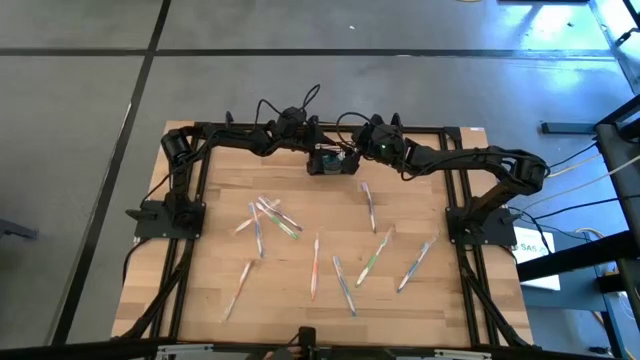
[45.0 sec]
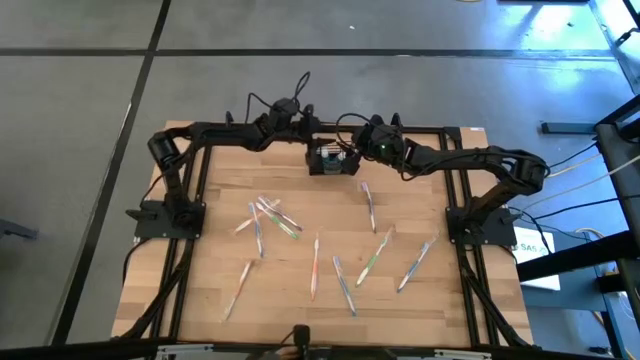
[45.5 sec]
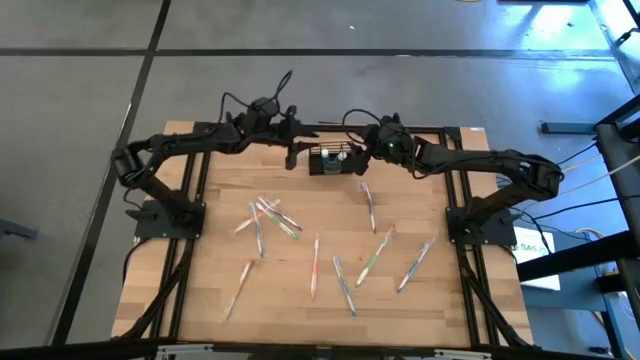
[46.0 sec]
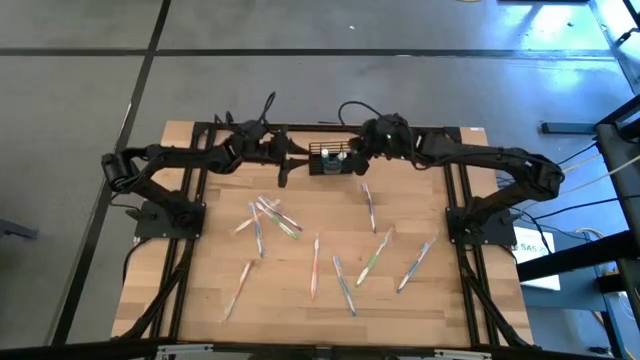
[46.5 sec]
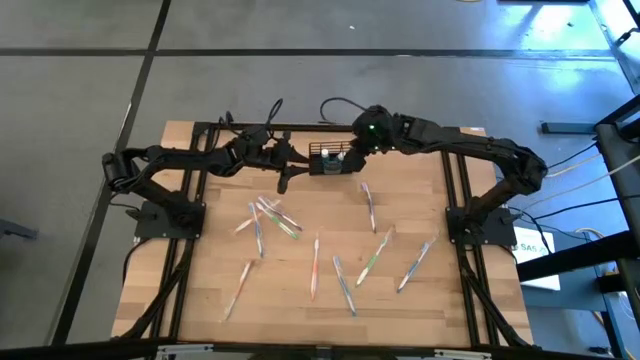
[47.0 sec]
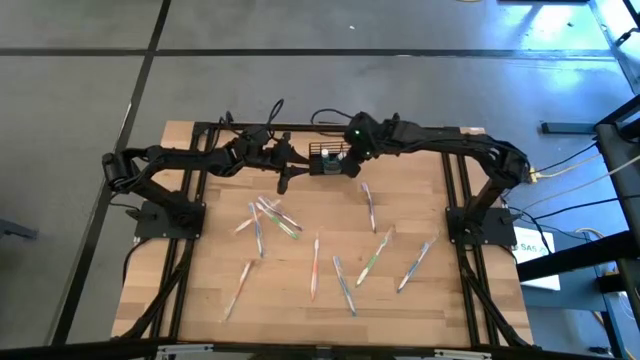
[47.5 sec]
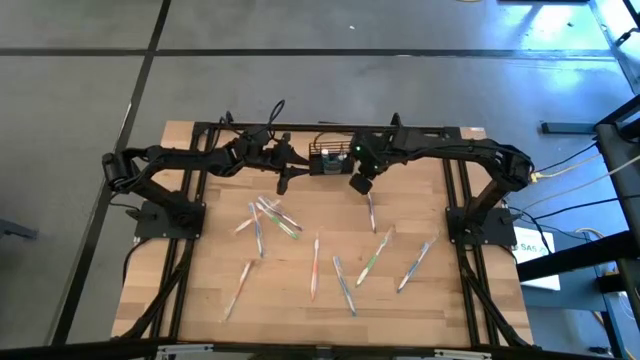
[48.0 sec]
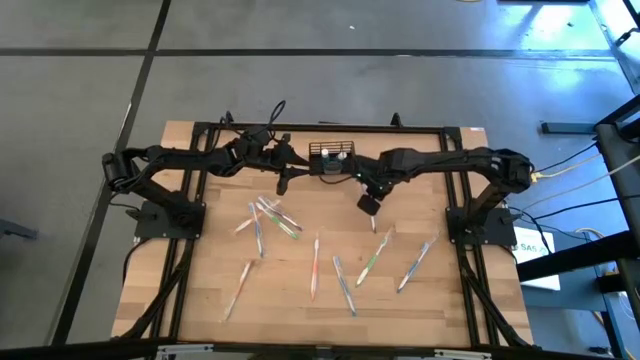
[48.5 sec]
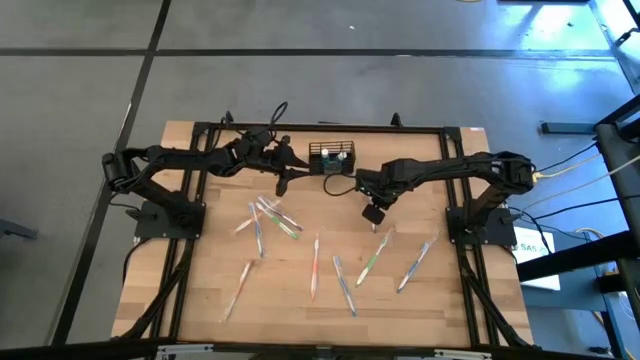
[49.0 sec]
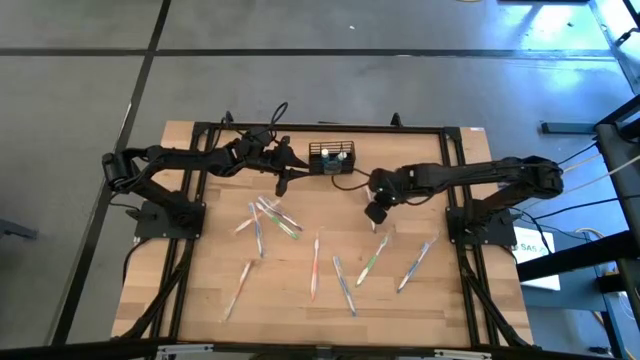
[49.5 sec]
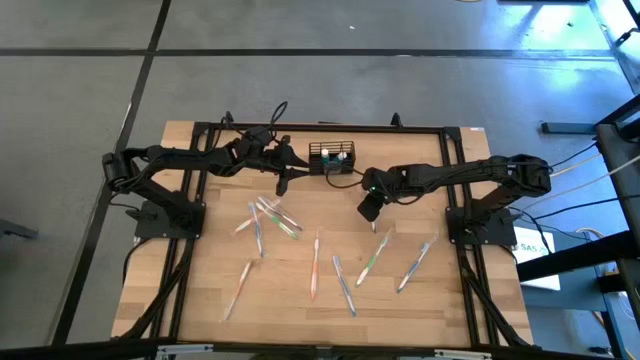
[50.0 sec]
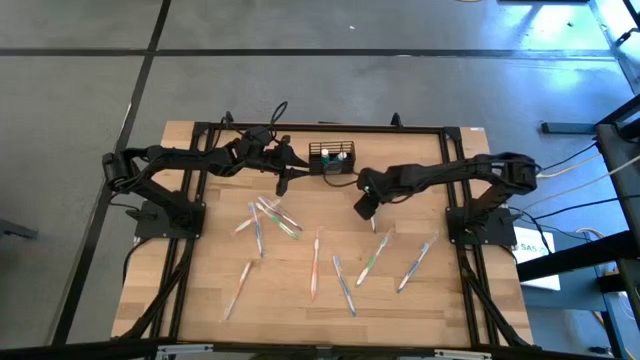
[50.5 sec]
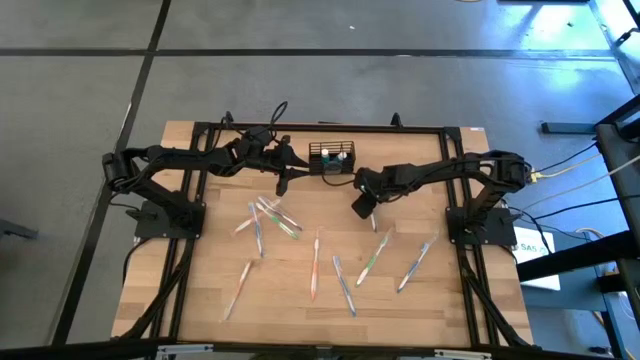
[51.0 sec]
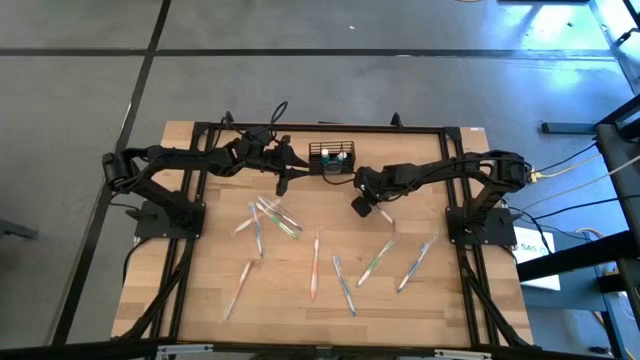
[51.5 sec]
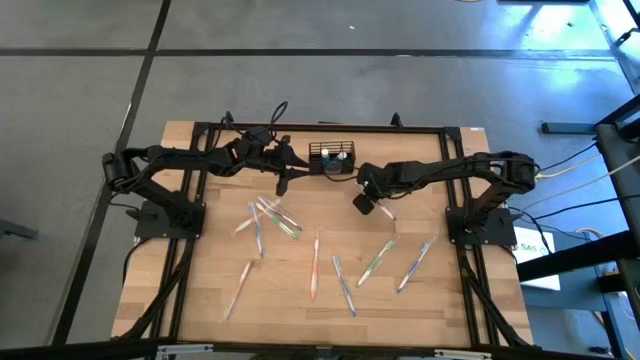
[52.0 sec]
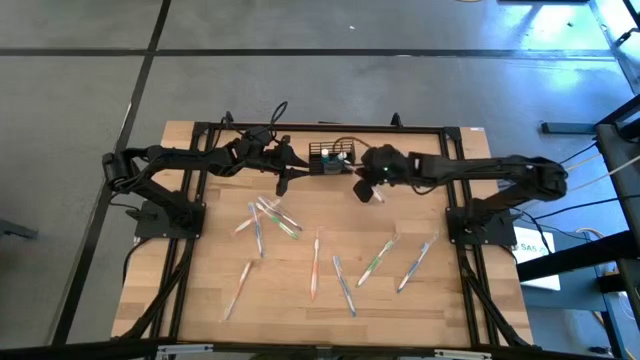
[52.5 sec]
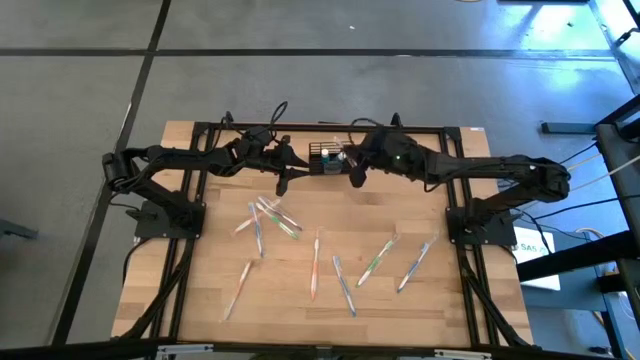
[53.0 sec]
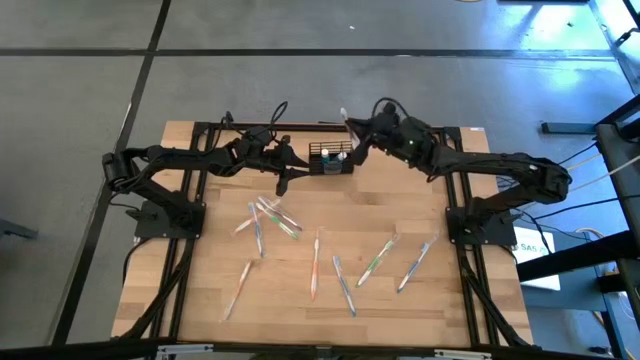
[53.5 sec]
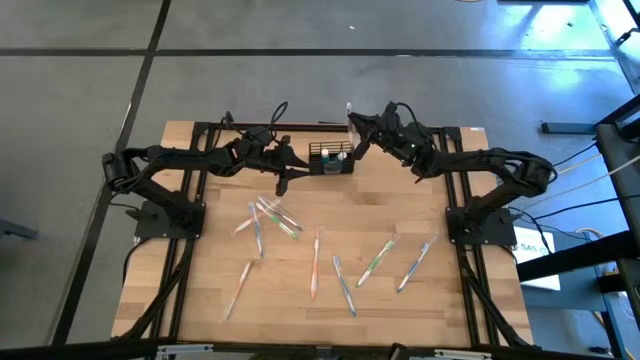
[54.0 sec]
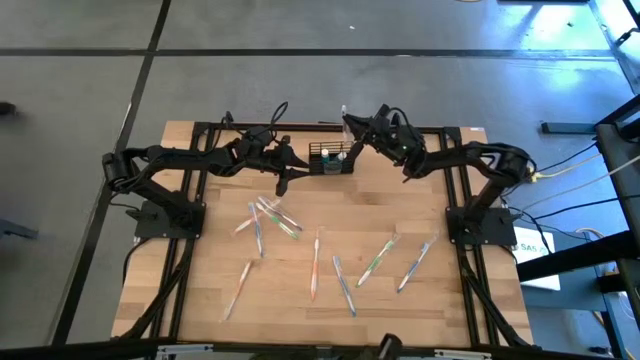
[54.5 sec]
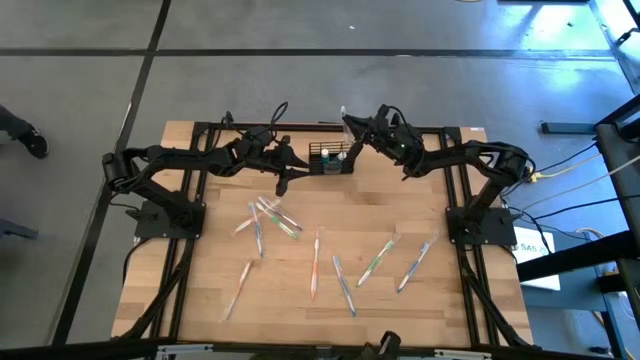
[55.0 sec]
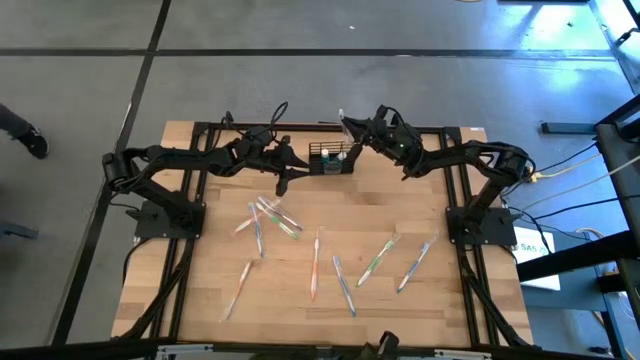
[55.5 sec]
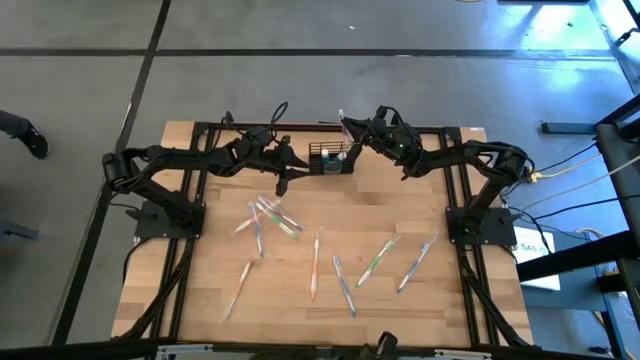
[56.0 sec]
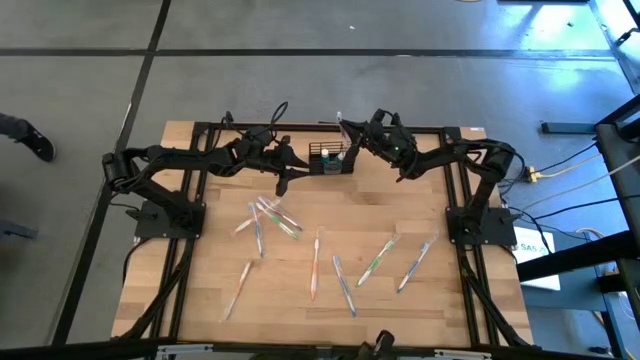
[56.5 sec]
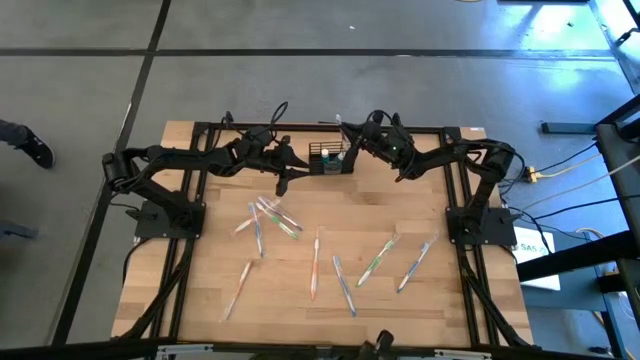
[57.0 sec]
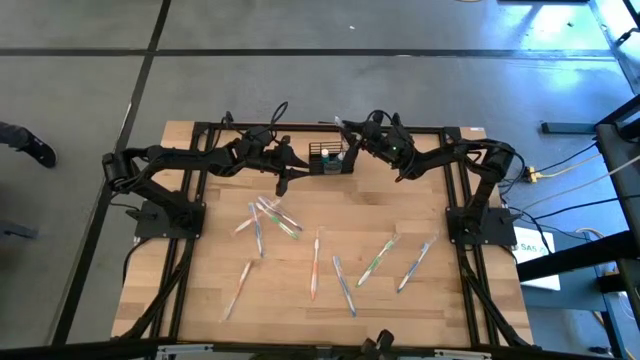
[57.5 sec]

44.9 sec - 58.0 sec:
Task: Pick & Place toothbrushing station
Put the right purple toothbrush in the right section of the wire organizer

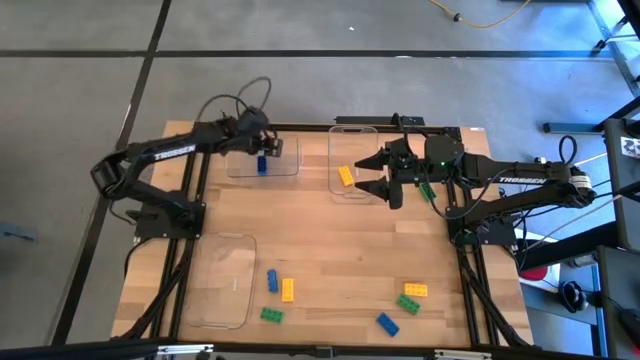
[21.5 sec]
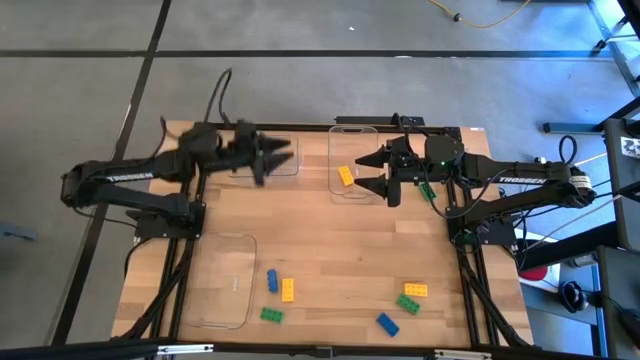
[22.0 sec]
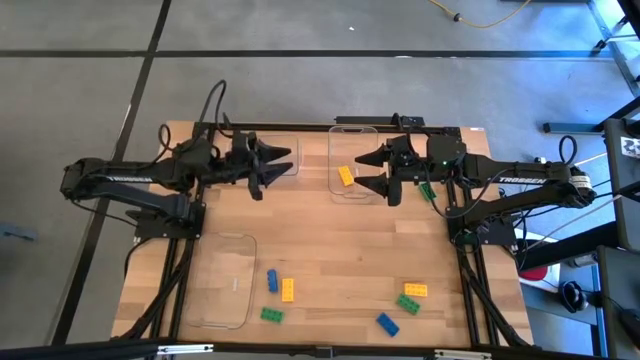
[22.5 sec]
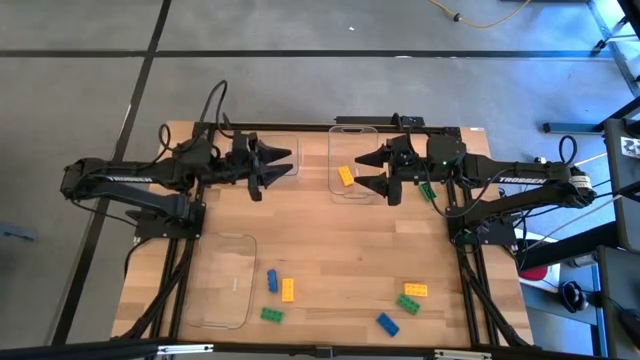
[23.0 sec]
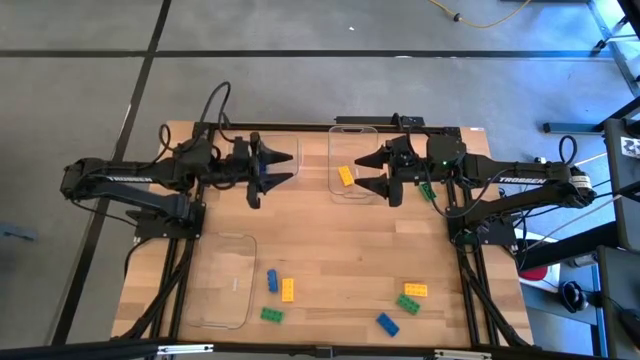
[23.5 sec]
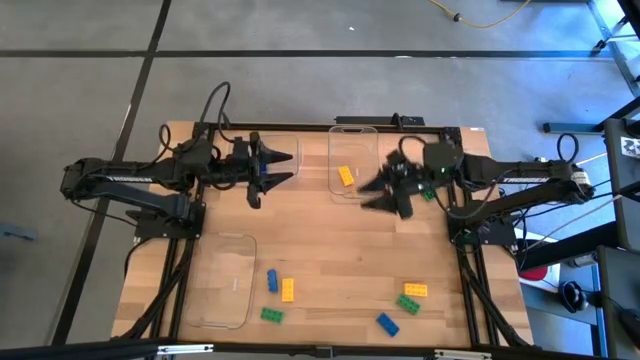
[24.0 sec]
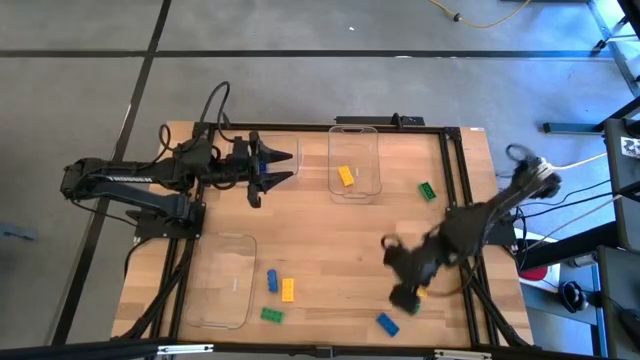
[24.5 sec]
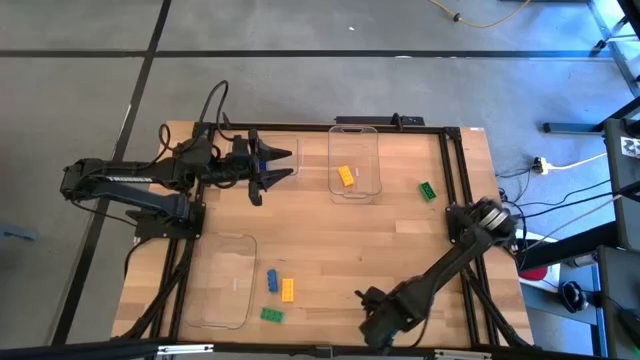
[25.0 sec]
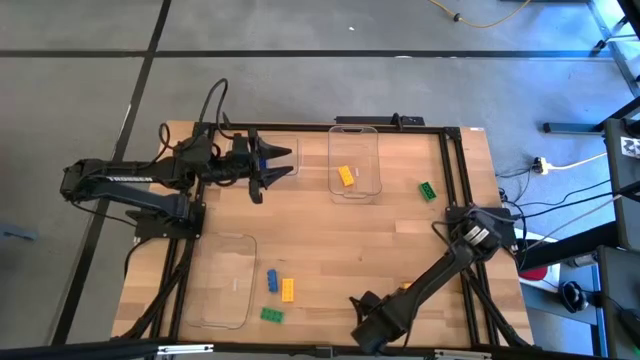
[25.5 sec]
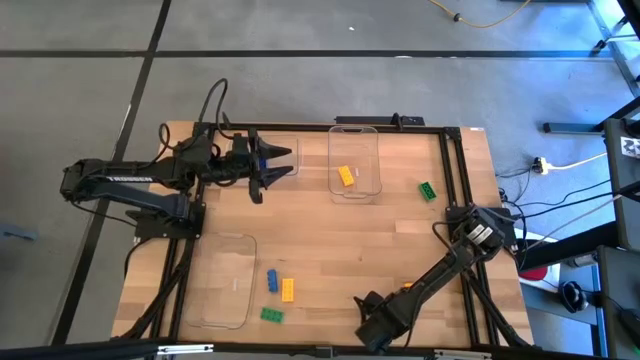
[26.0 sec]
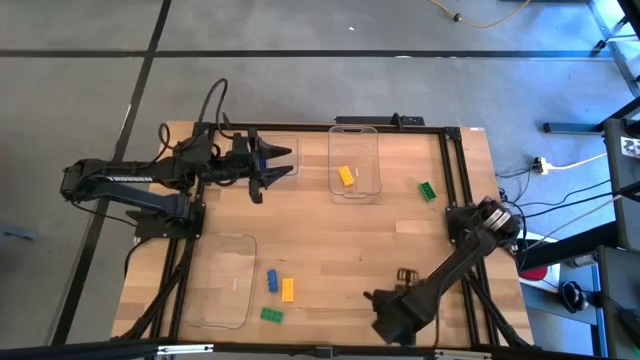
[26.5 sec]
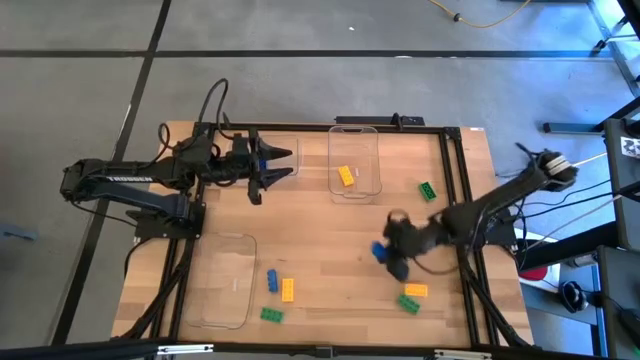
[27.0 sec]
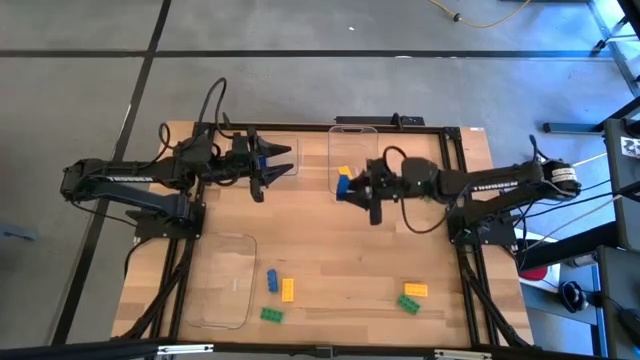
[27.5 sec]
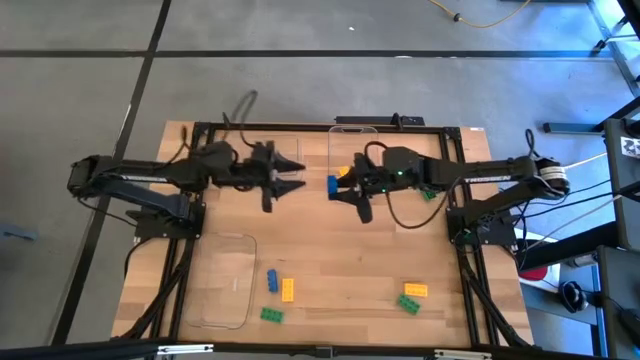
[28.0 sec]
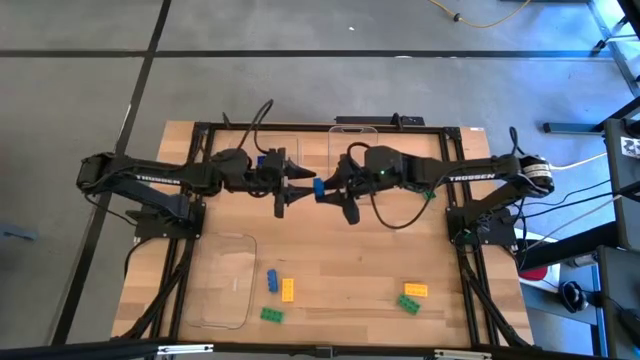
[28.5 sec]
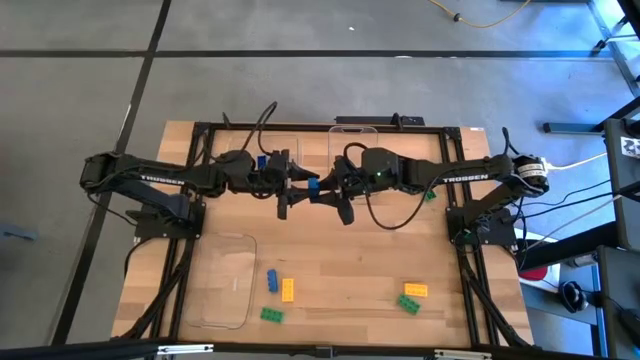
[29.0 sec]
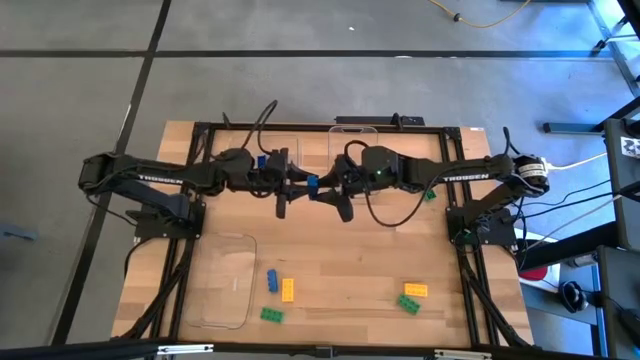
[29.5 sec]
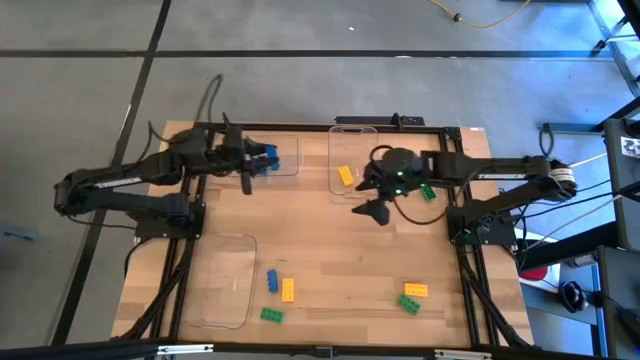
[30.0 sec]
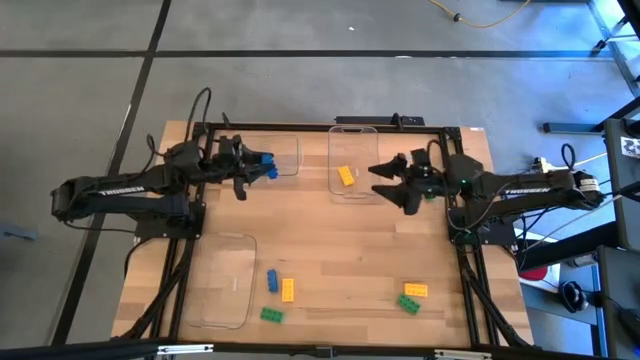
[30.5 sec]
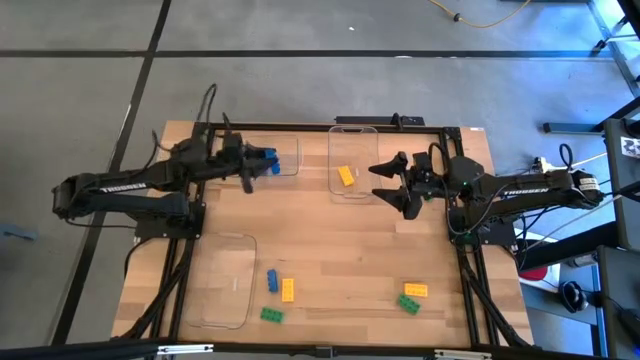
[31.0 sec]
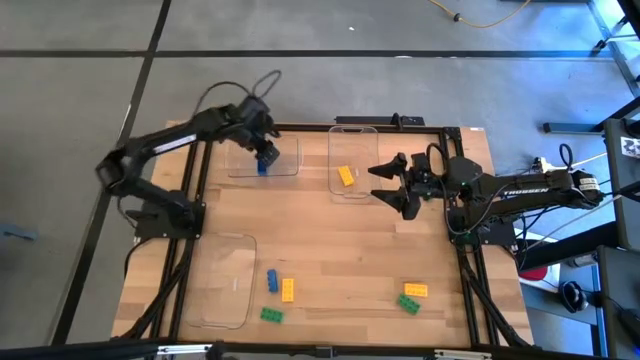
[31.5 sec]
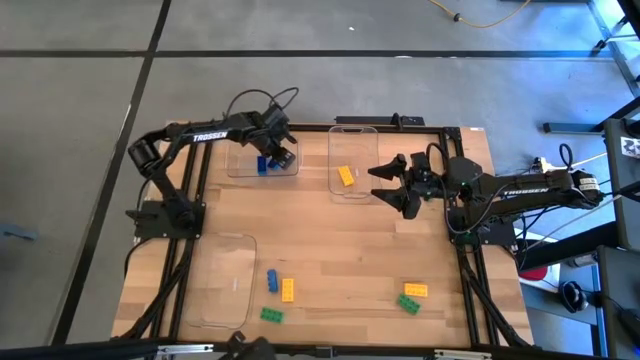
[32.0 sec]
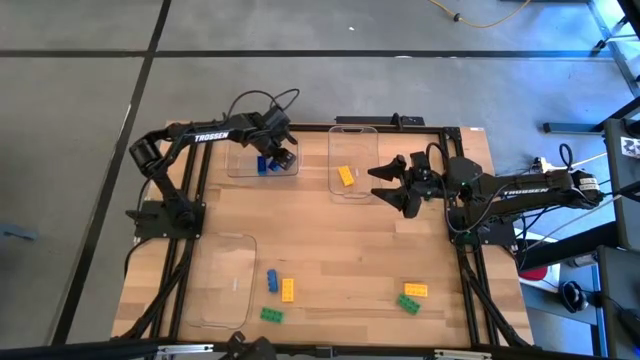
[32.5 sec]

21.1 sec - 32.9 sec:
Task: Sort & place blocks by color
Put the bottom right blue game piece into the top left transparent bin
